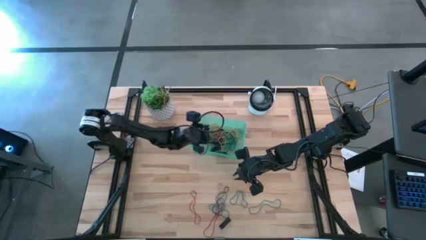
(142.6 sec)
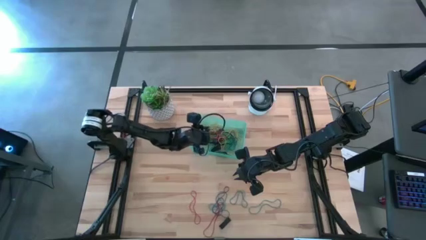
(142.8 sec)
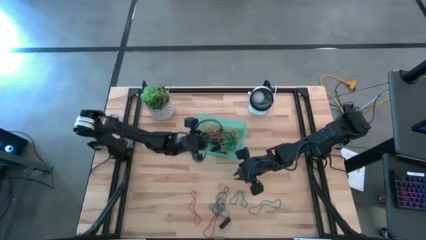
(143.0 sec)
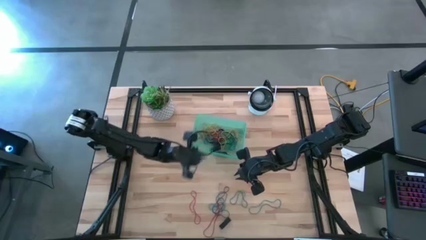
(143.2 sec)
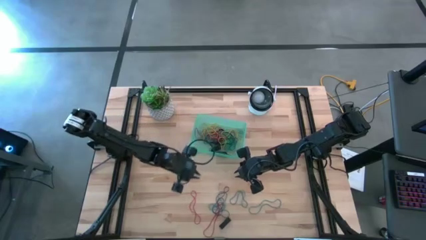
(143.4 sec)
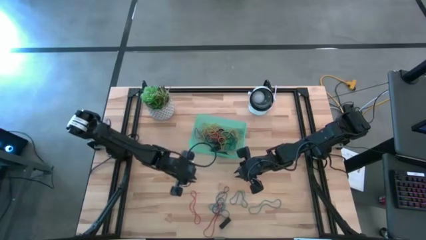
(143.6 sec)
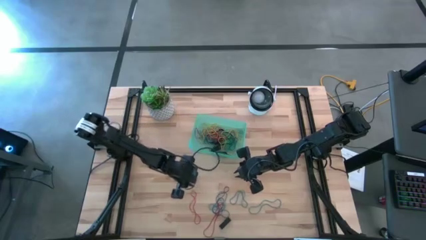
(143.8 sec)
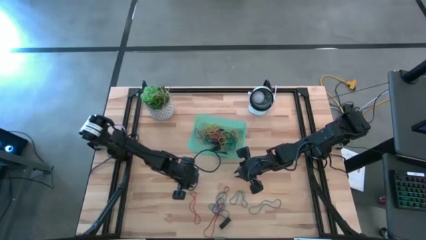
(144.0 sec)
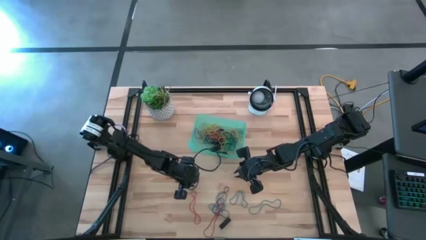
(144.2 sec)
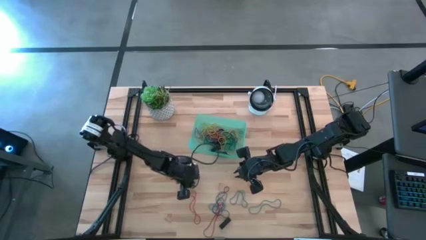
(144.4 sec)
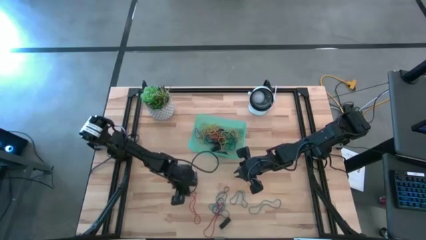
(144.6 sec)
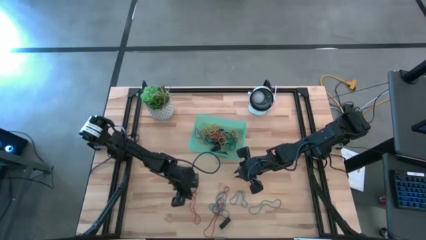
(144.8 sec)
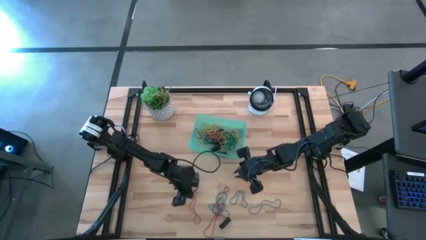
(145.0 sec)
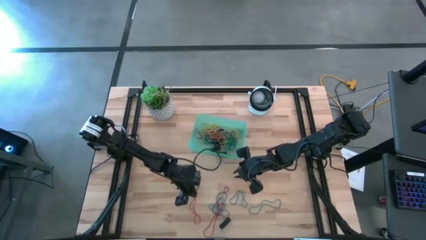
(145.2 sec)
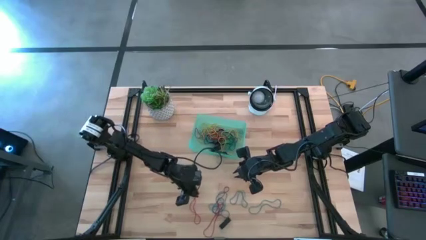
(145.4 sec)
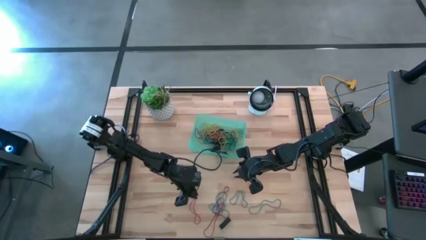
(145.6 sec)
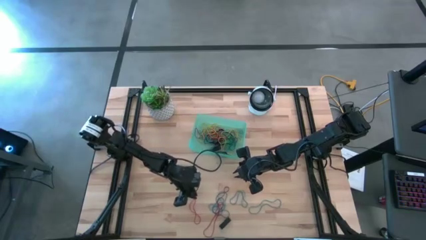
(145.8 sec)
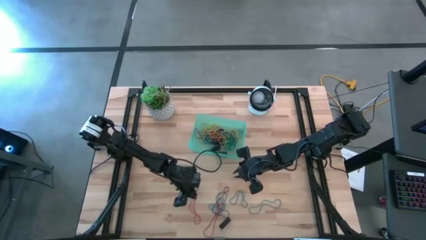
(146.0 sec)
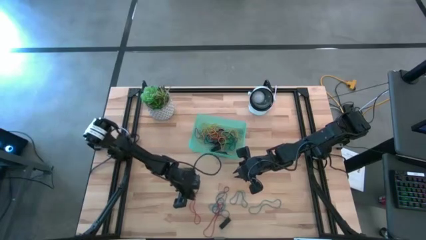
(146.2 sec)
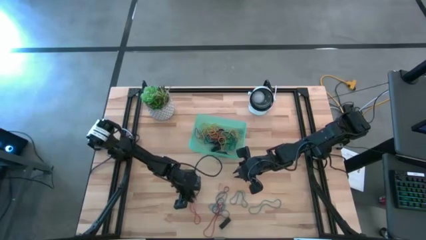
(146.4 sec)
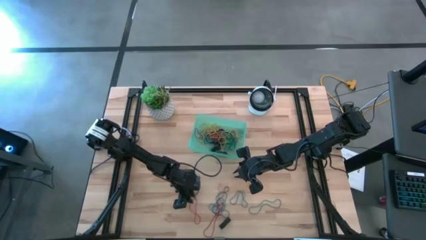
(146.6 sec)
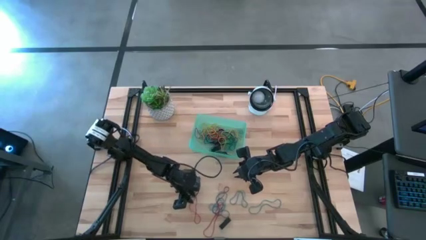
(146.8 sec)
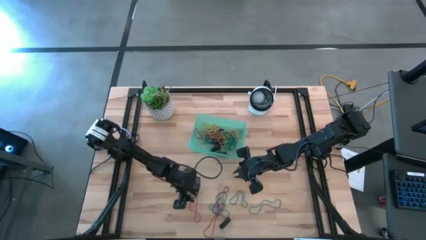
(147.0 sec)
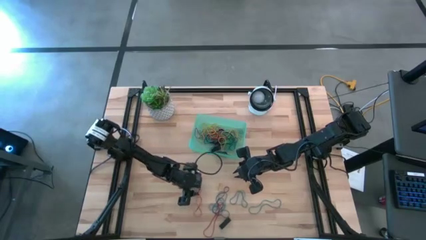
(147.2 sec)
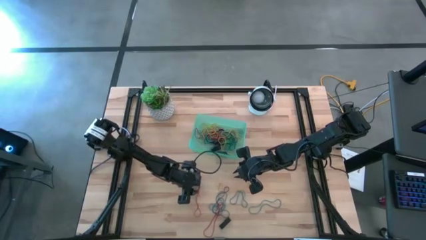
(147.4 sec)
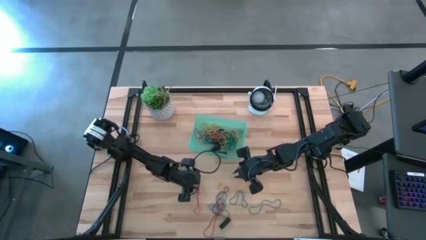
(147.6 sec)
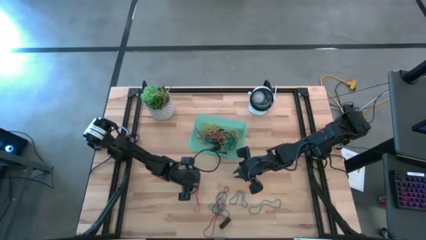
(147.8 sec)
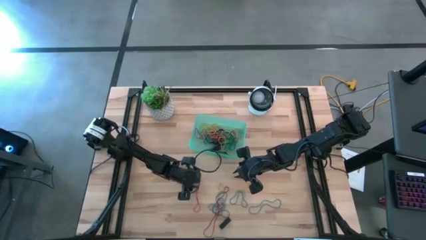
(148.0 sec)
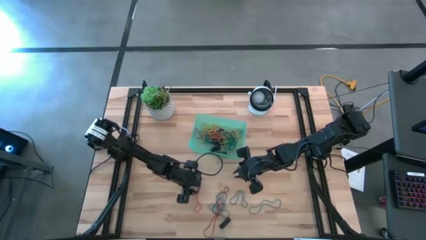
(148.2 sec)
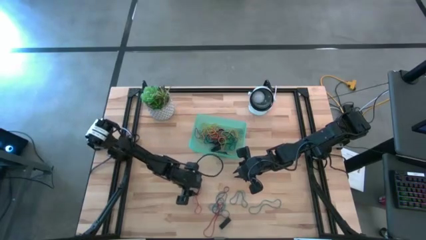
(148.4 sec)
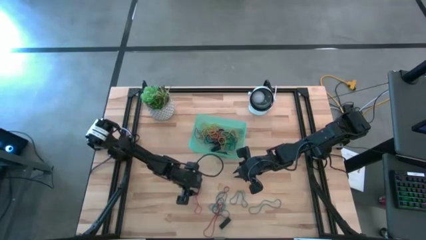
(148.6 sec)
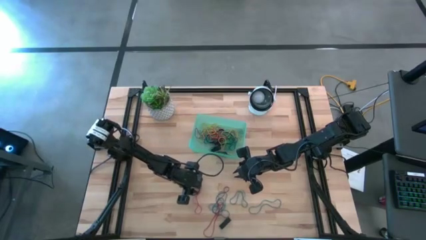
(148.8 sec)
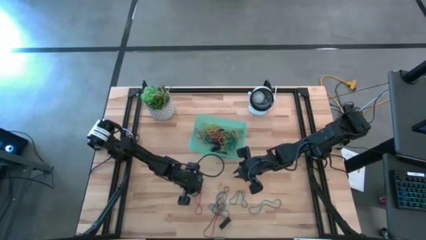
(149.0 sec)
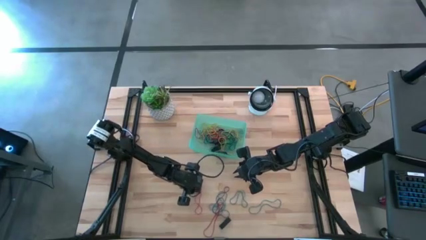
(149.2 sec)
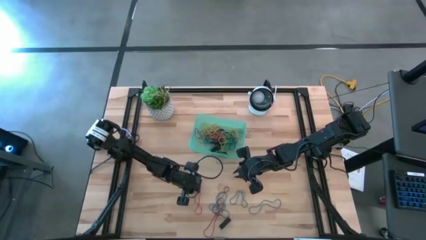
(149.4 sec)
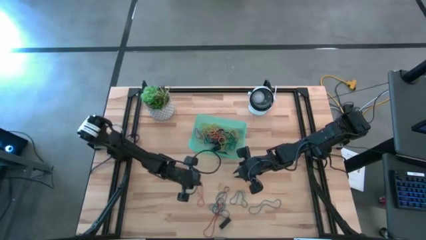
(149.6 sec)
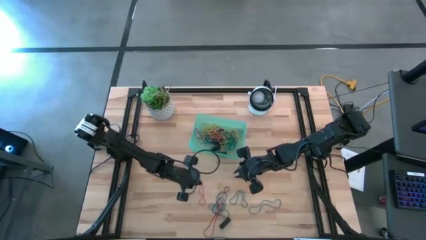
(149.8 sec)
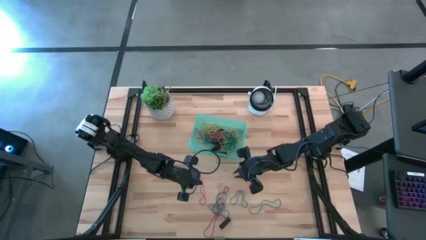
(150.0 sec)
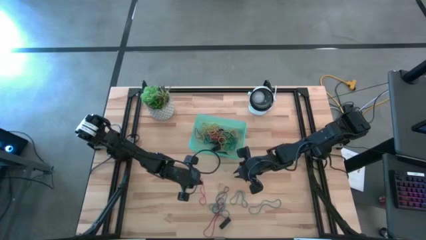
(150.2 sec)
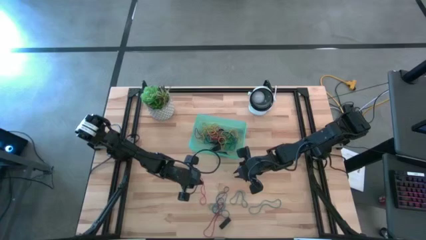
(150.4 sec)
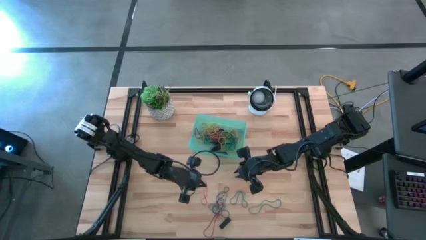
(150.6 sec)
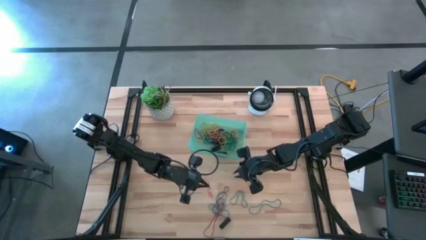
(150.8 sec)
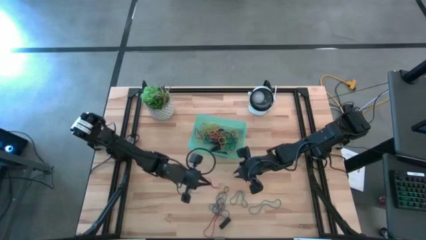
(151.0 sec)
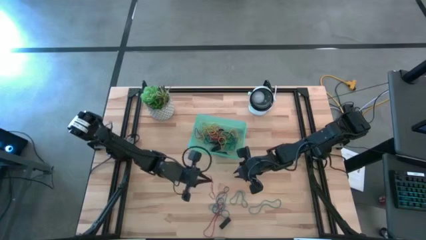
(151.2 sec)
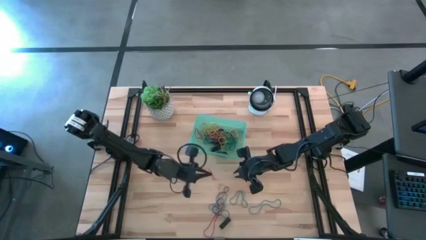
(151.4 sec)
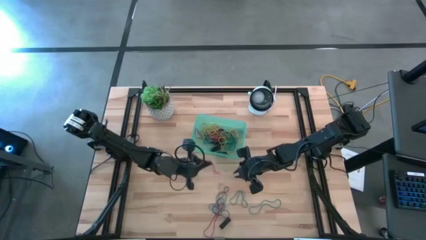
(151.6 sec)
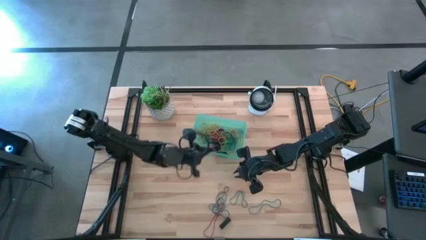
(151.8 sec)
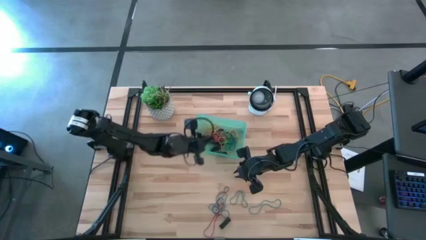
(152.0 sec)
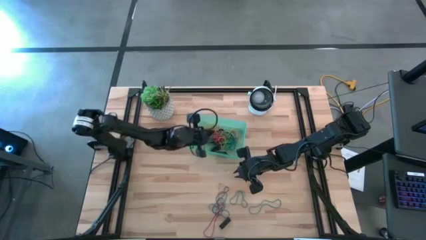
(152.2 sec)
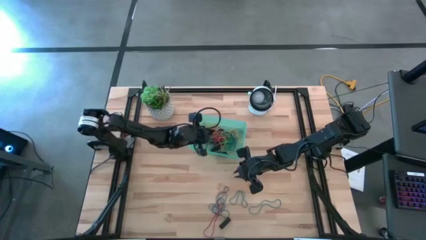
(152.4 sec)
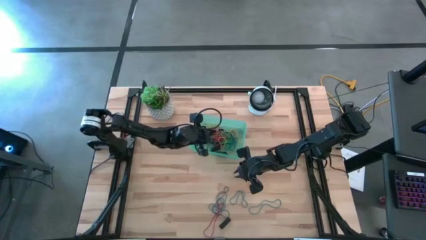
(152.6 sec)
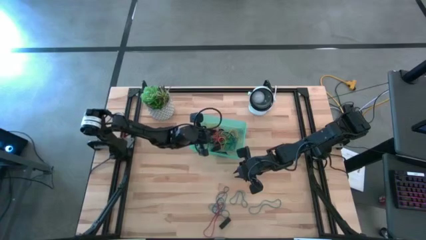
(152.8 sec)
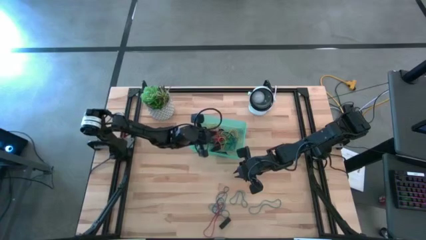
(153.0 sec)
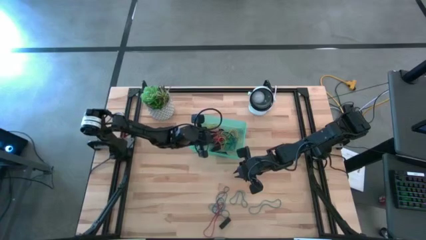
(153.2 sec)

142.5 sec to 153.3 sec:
Task: Pick and place rubber bands into bin
Put the red rubber band into the green bin

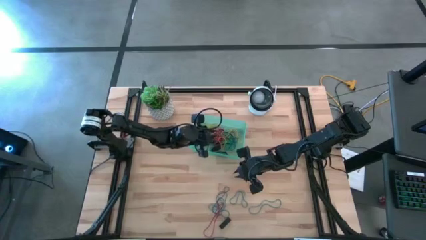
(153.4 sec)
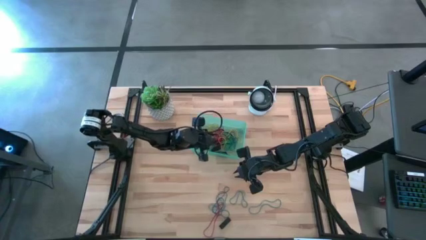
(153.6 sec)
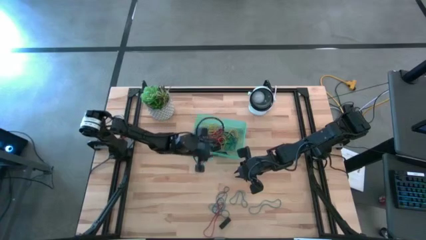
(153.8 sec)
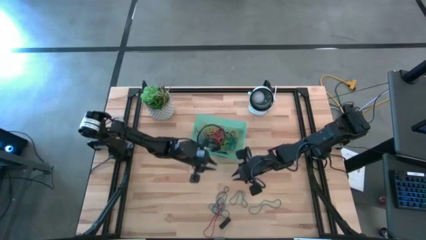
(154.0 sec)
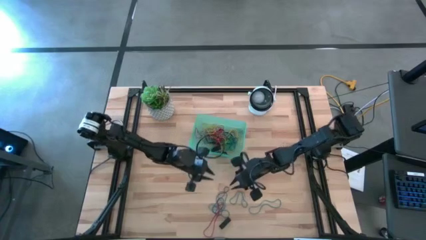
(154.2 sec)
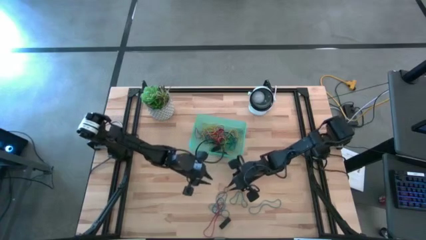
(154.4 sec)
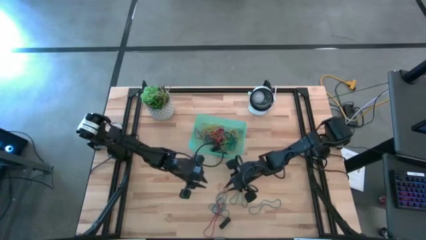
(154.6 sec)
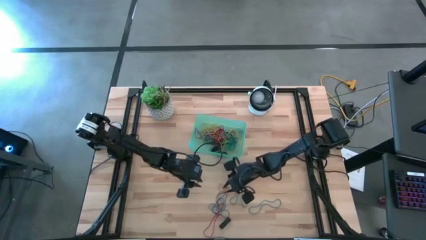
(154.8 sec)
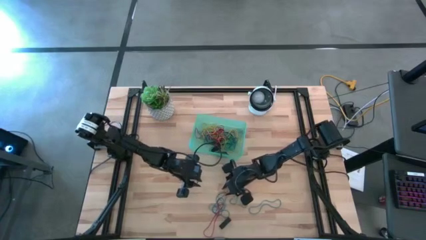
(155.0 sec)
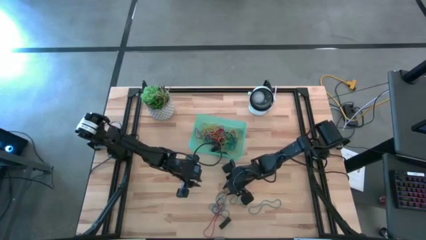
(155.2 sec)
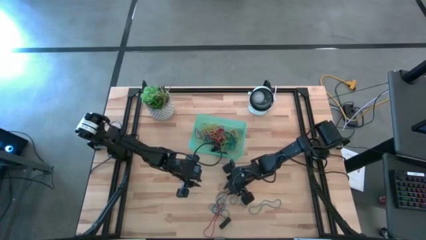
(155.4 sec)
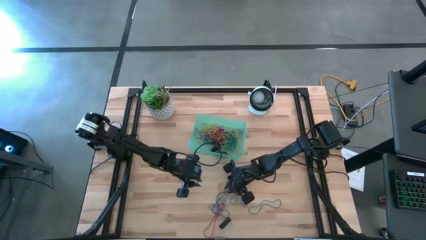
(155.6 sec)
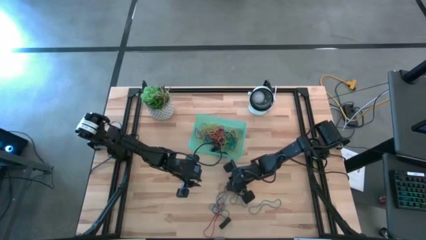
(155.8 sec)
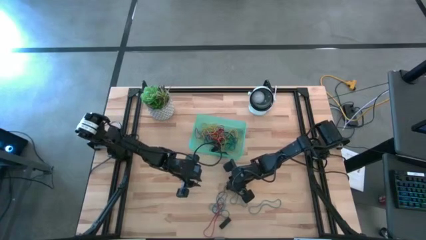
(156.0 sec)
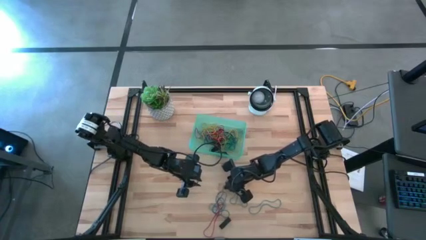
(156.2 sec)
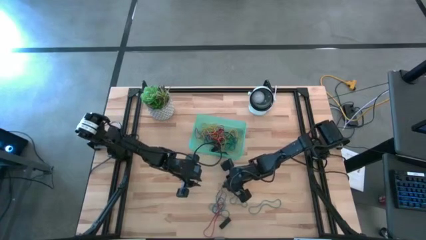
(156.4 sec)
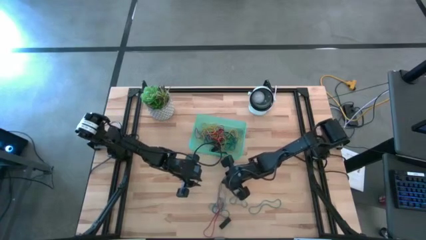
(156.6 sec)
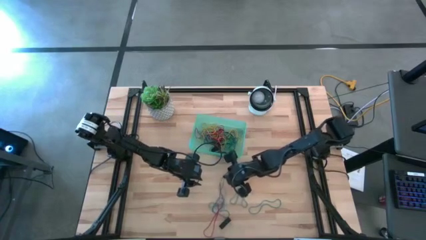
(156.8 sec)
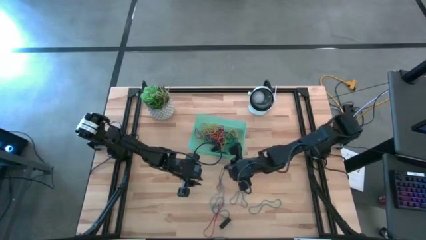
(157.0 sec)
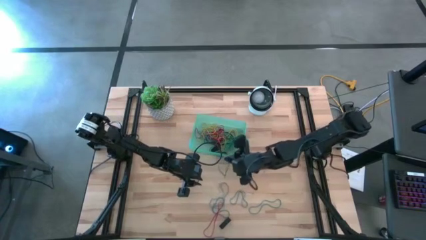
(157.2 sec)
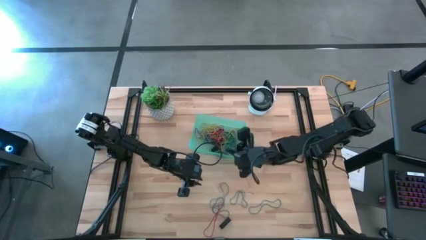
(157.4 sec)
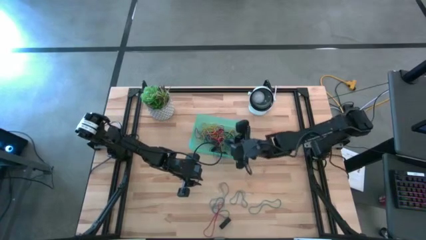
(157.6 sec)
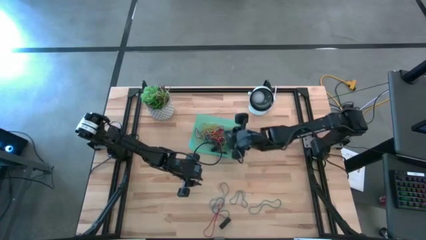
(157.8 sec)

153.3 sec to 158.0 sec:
Put the violet rubber band into the green bin

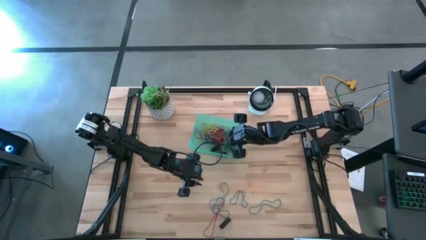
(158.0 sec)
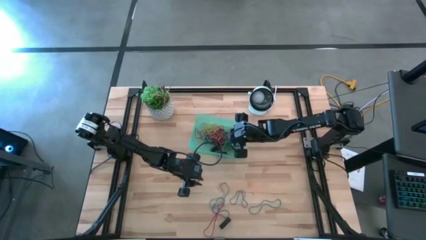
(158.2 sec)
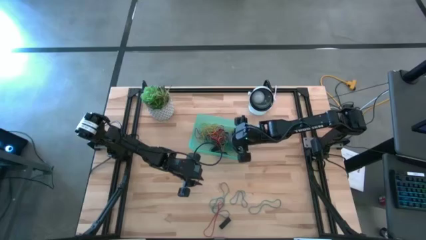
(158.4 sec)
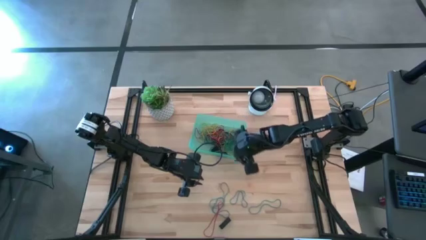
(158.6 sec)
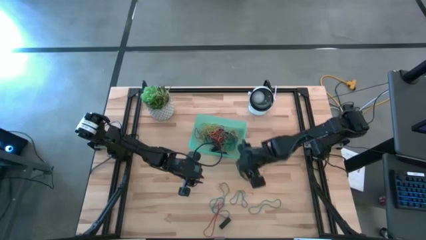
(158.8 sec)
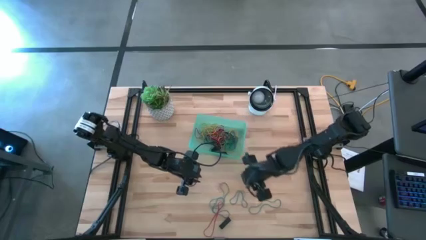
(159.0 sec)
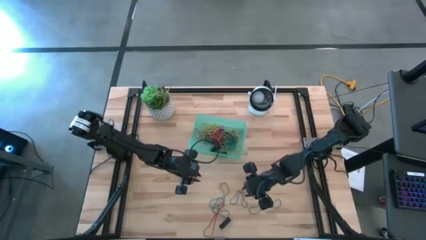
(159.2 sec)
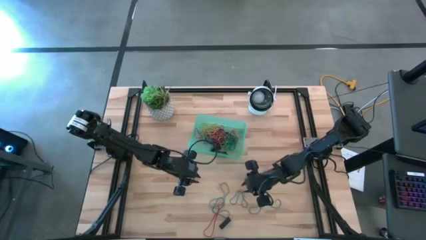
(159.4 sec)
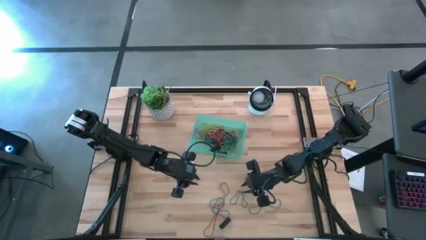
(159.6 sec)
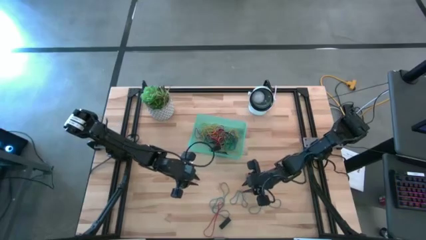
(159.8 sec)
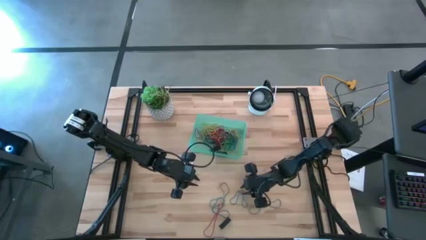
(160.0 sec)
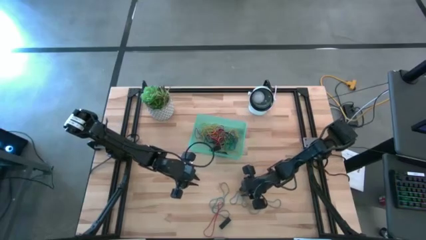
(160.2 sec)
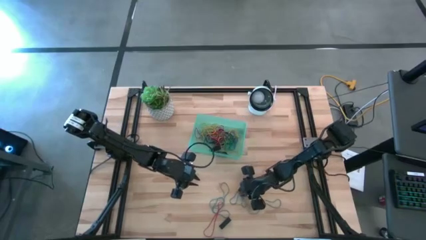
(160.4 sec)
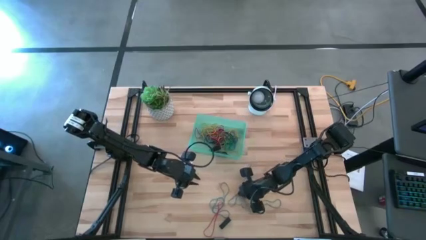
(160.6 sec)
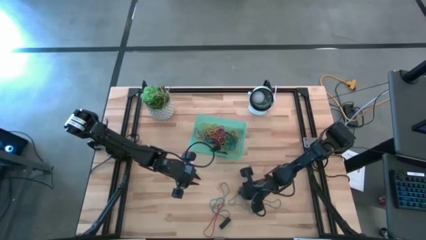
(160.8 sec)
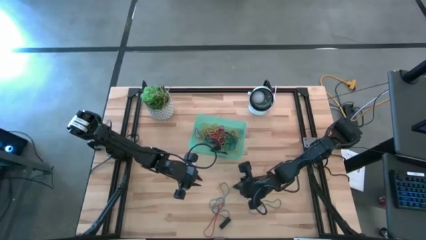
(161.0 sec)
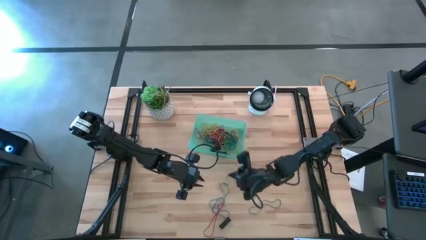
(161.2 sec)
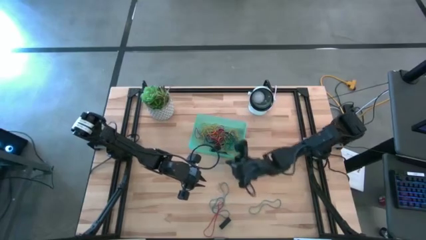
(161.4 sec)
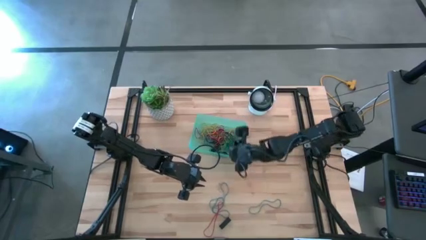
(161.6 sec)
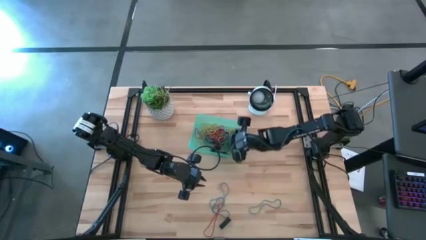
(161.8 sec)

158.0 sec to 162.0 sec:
Put the blue rubber band into the green bin
